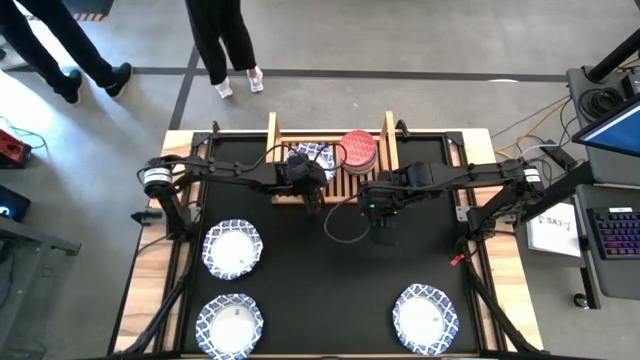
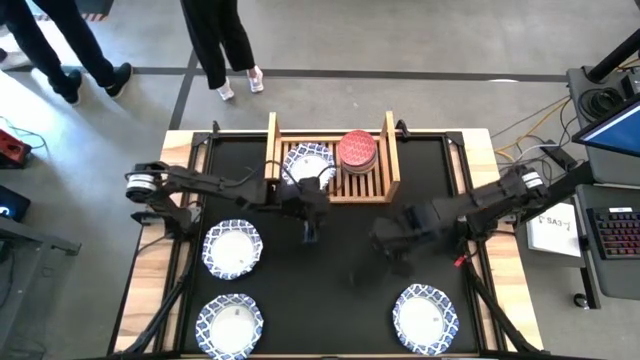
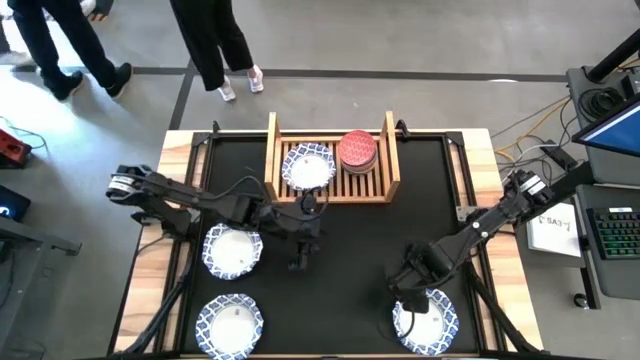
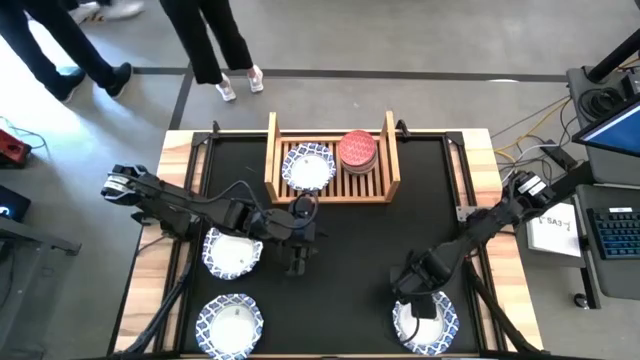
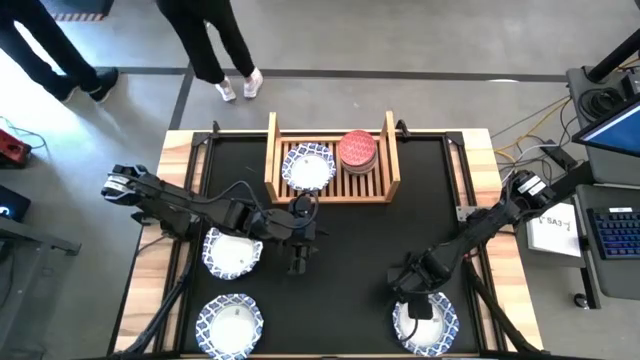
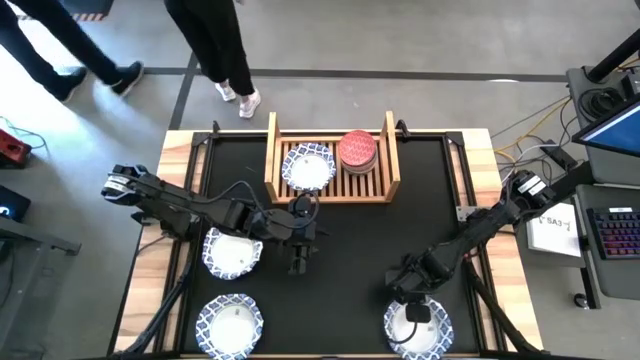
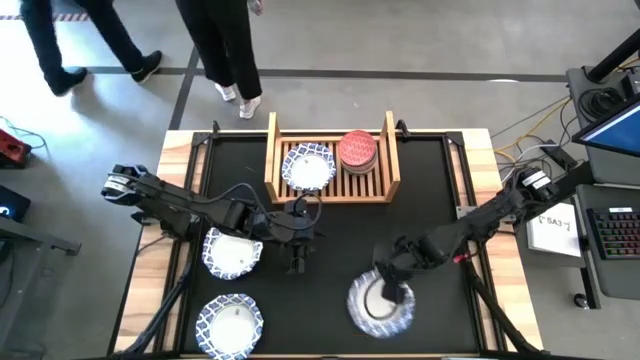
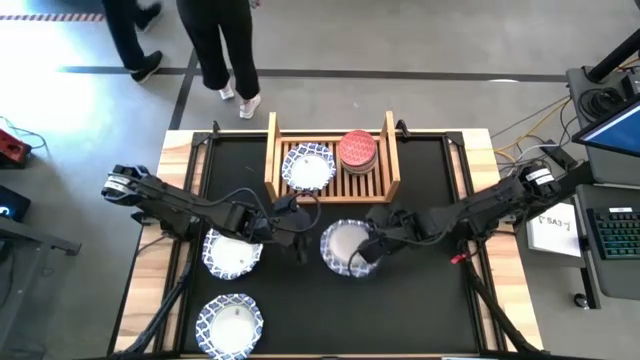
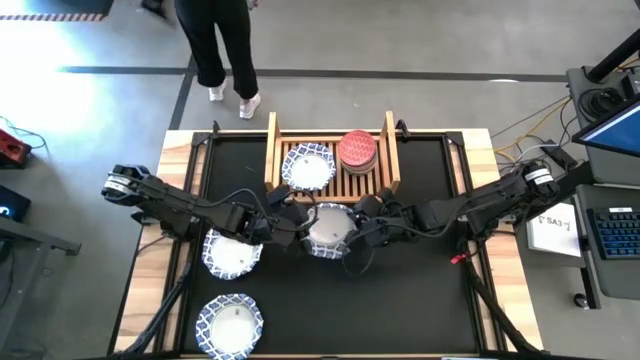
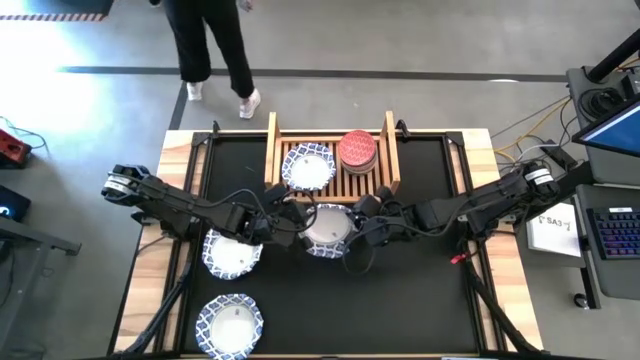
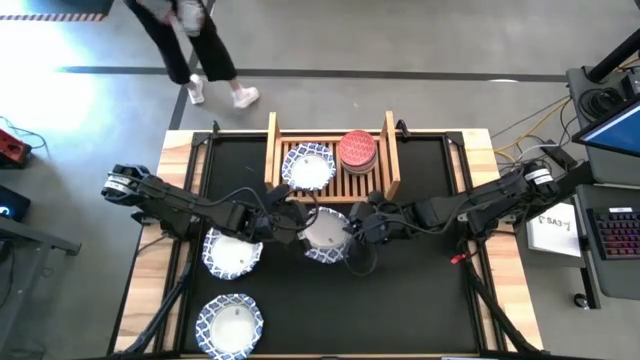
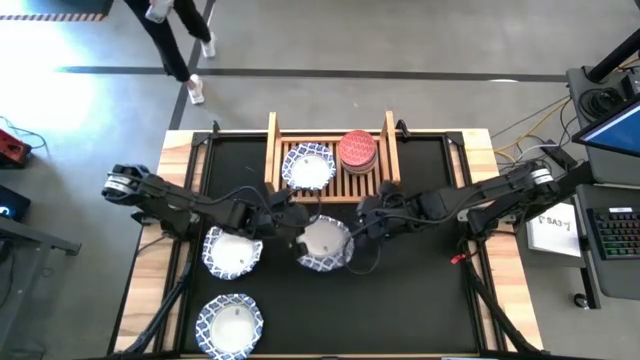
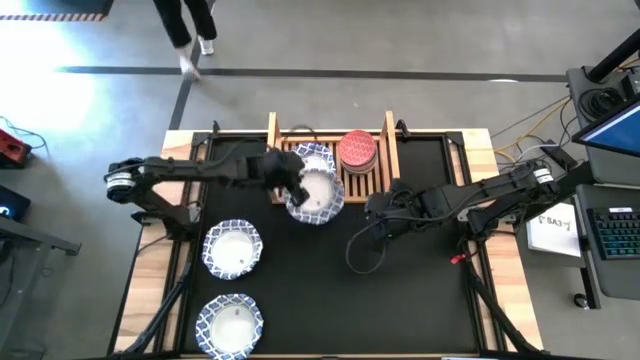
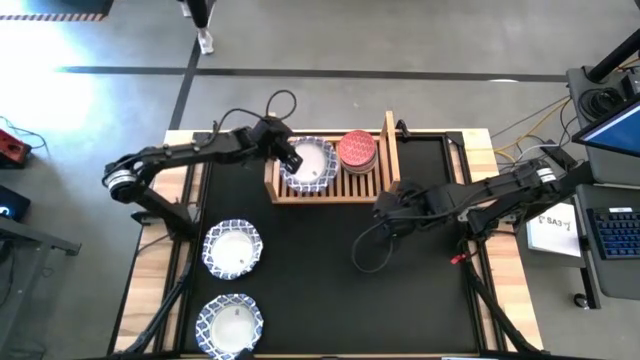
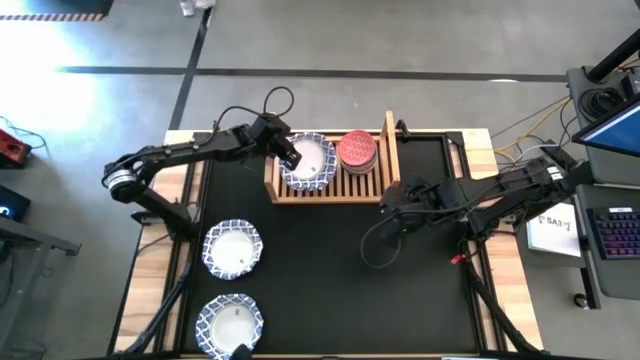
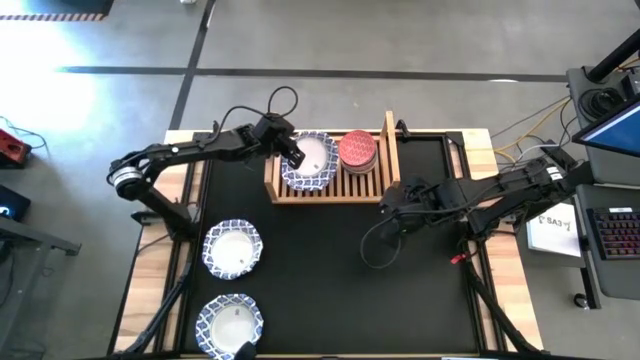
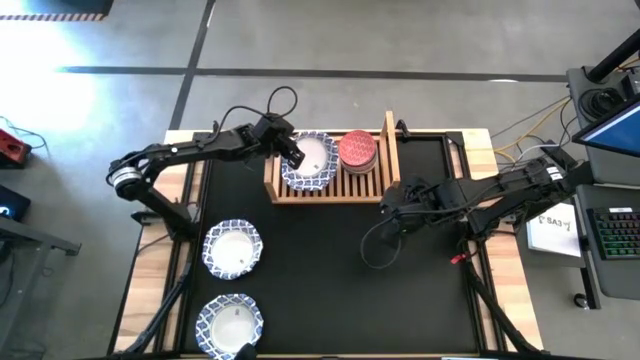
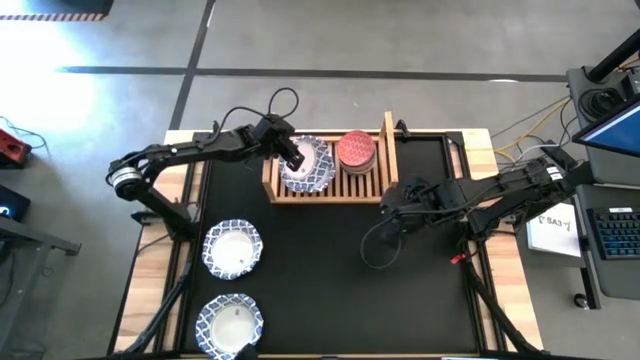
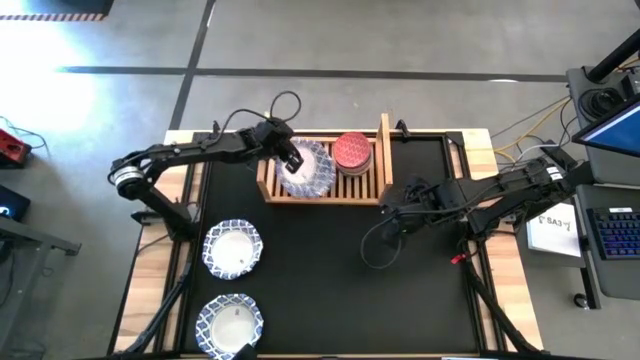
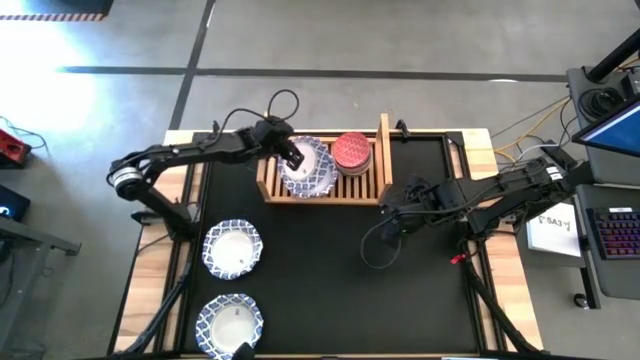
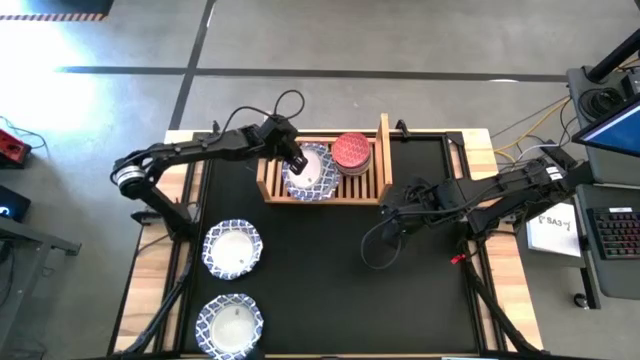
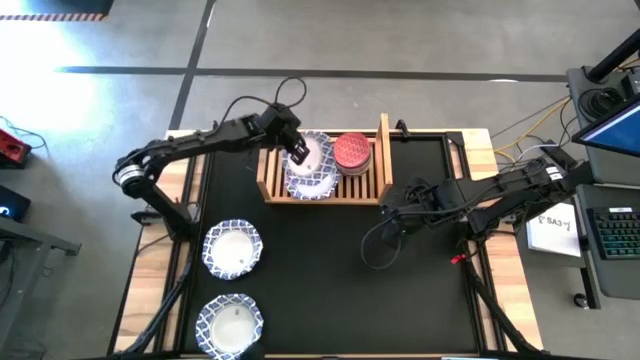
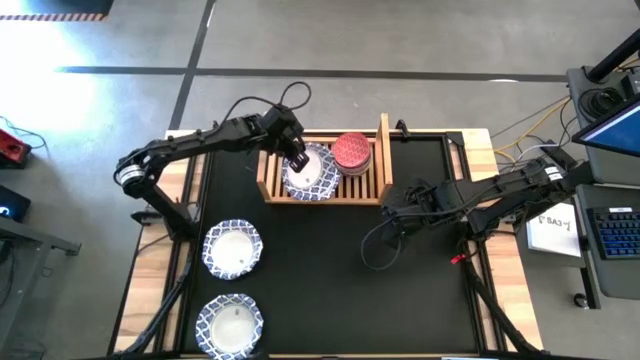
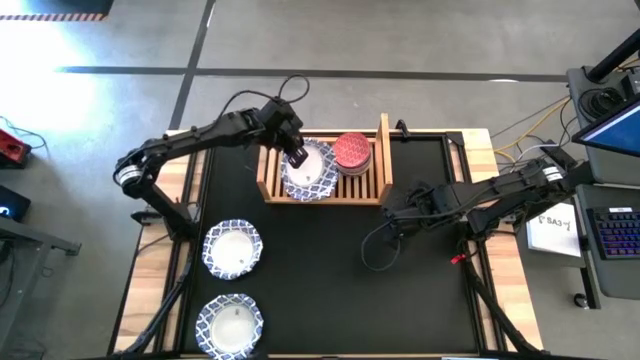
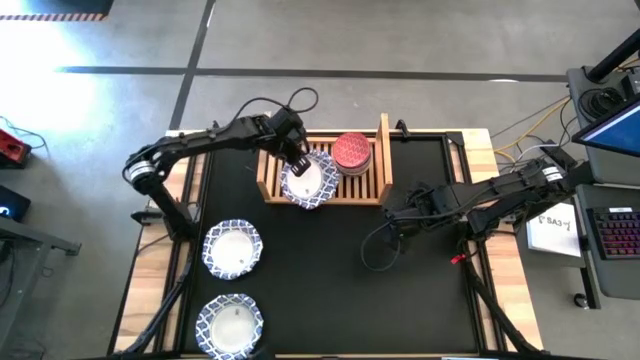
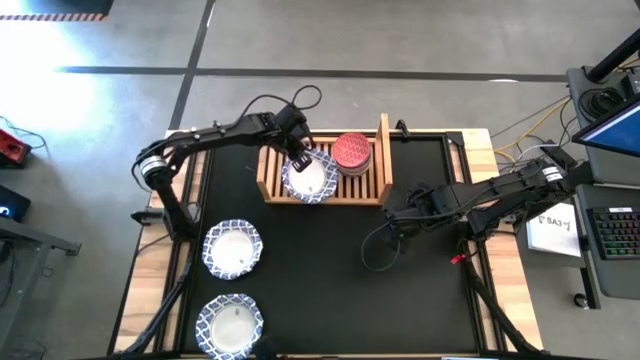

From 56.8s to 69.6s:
Task: Place and stack bowls onto a shelf
Stack the white blue patterned bowl on top of the white blue patterned bowl on the shelf

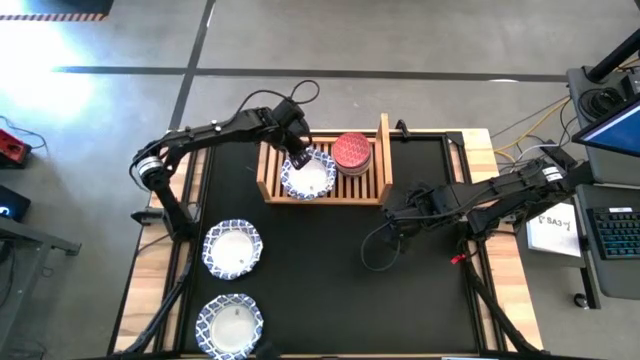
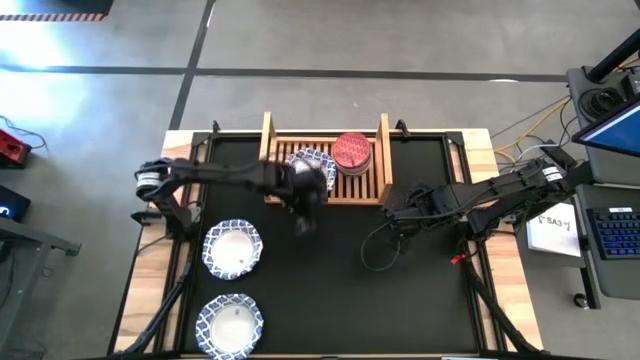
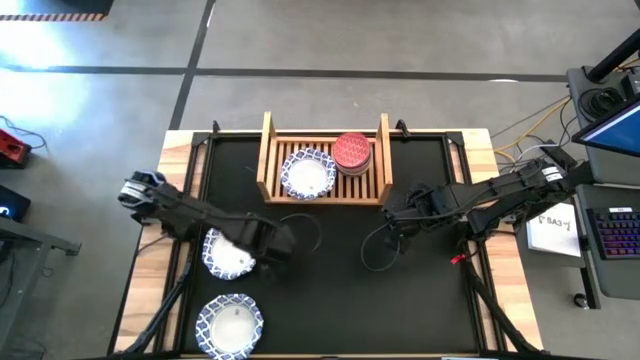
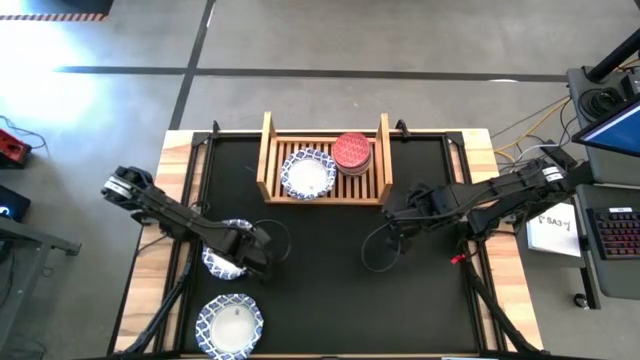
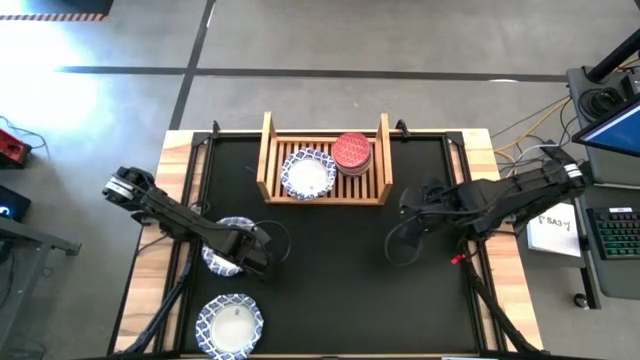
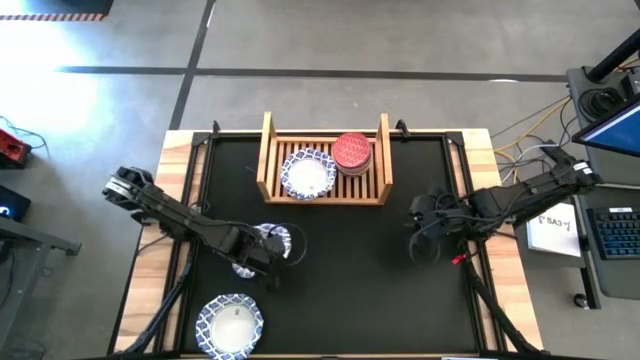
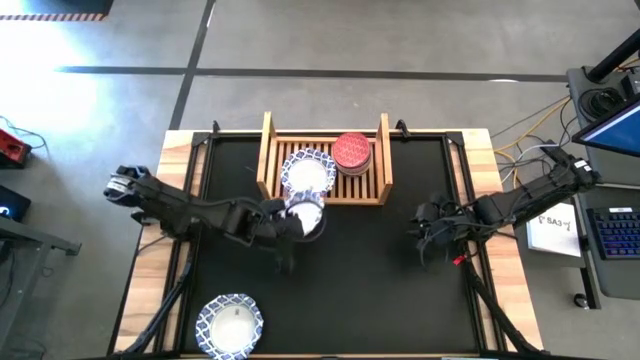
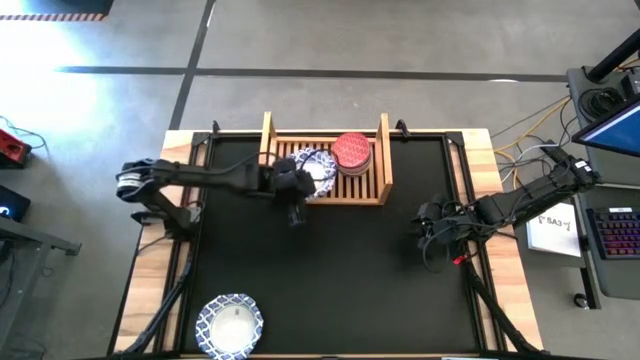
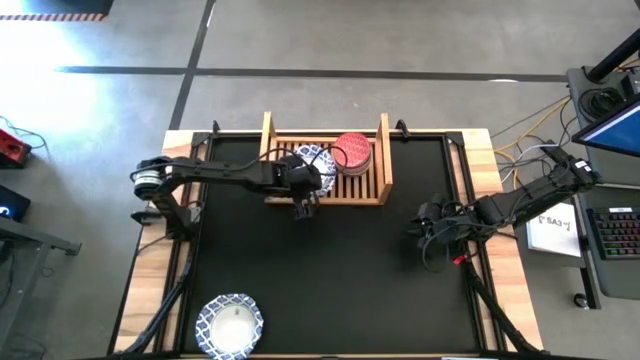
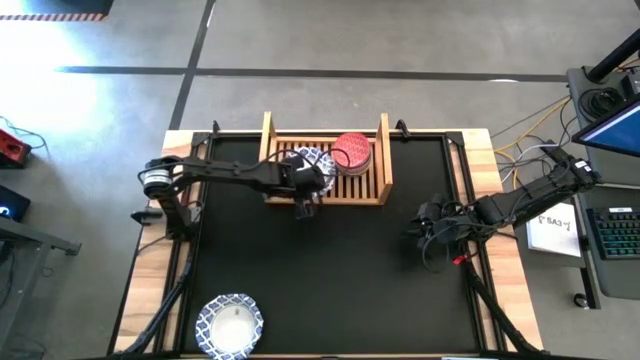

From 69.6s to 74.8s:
Stack the white blue patterned bowl on top of the white blue patterned bowl on the shelf

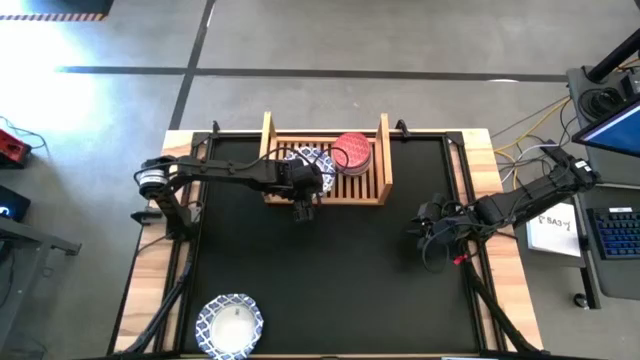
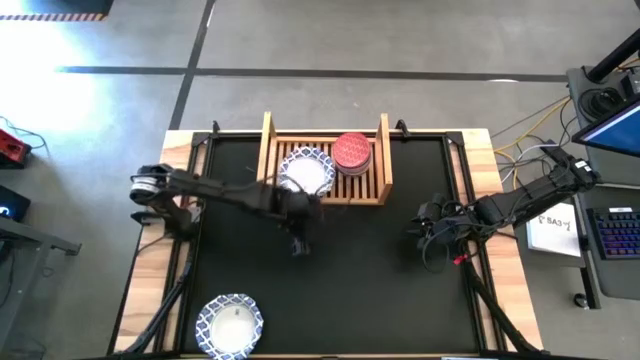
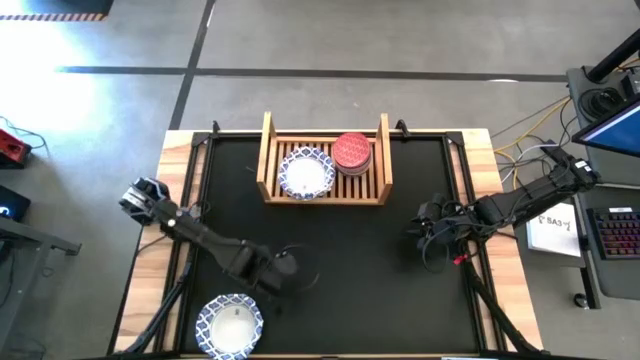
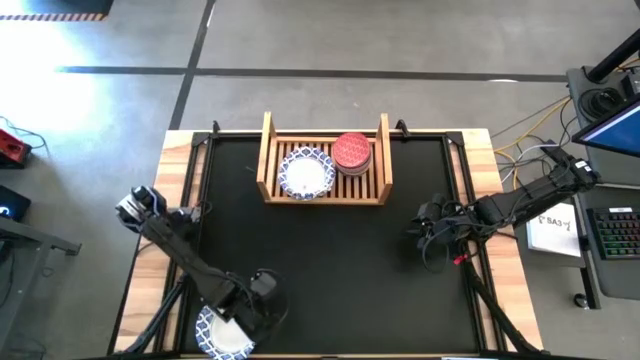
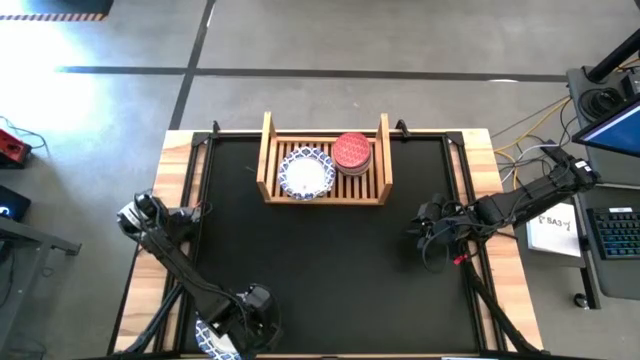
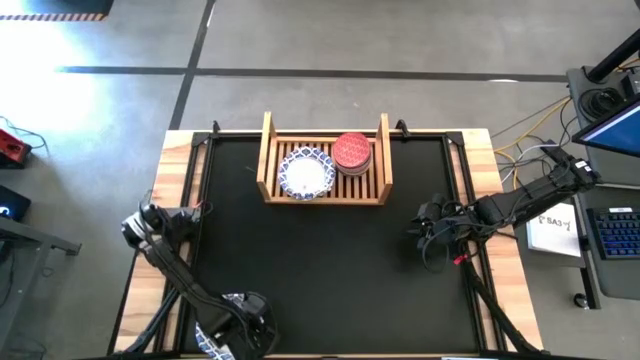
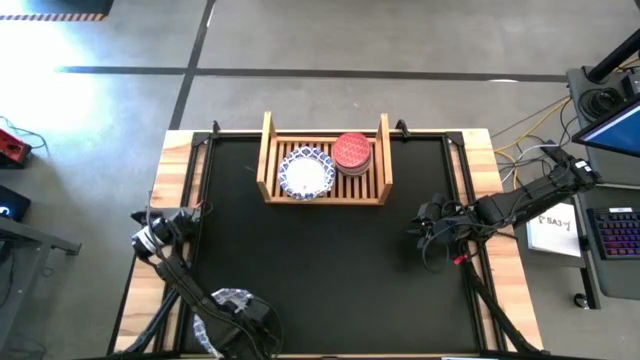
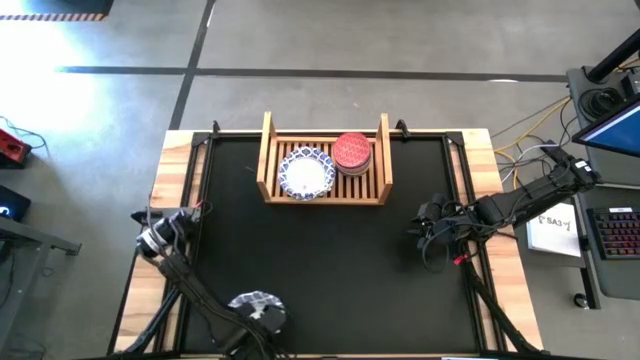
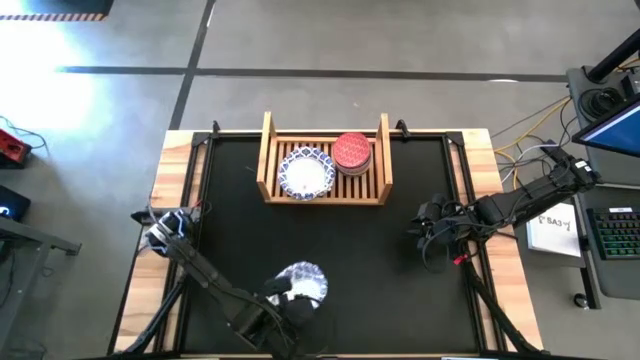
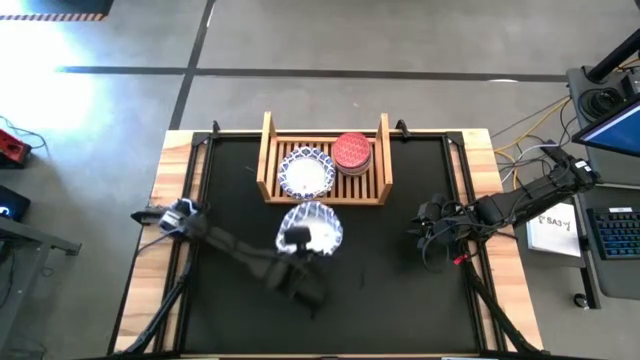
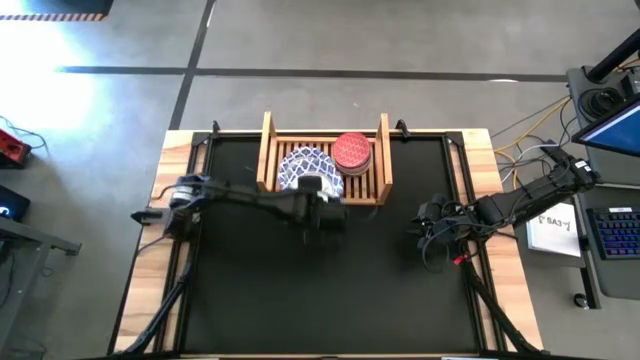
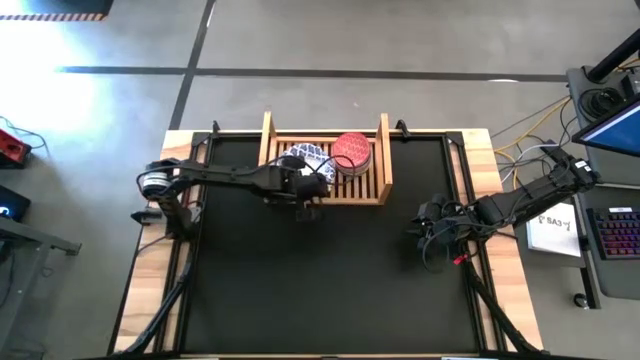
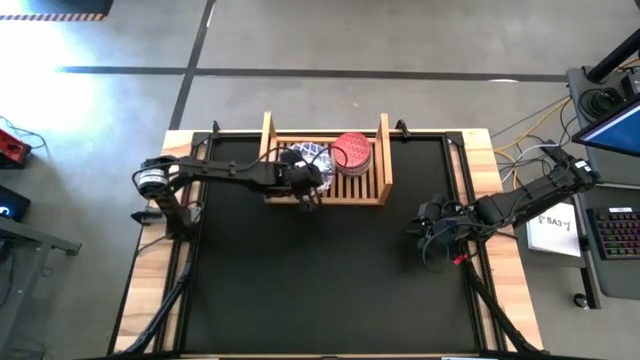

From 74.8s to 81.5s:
Stack the white blue patterned bowl on top of the white blue patterned bowl on the shelf
